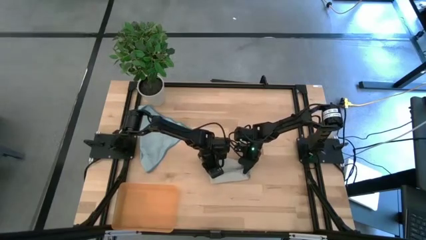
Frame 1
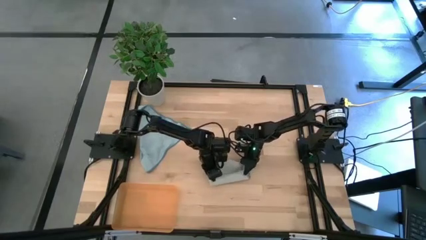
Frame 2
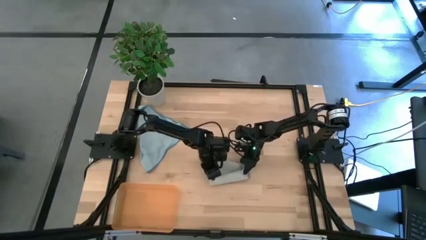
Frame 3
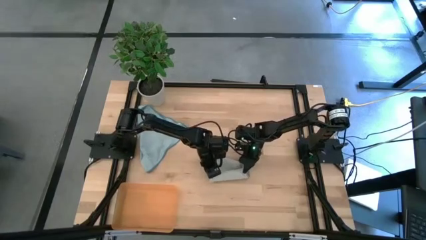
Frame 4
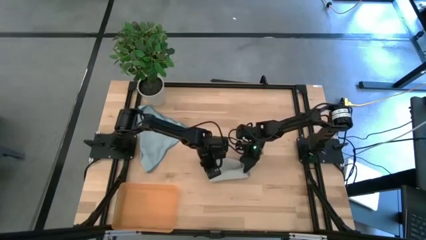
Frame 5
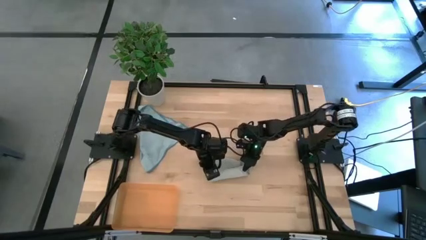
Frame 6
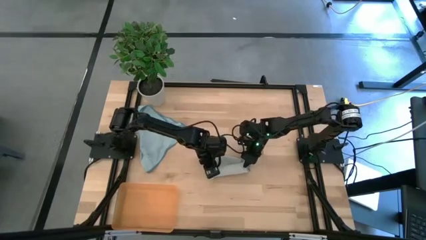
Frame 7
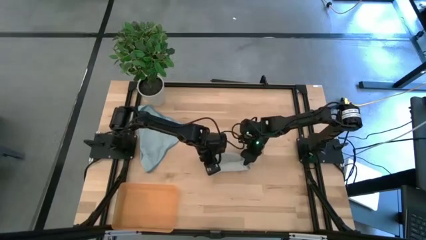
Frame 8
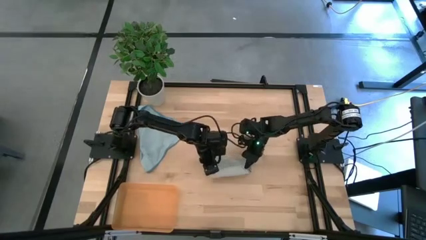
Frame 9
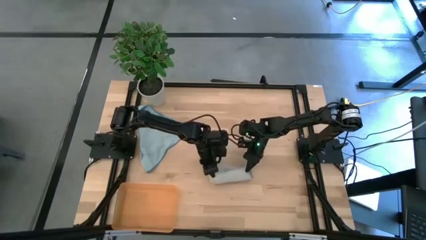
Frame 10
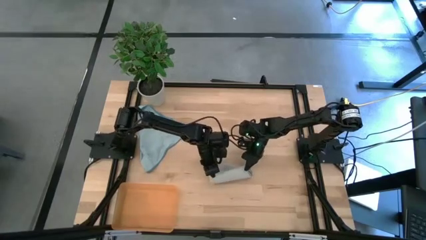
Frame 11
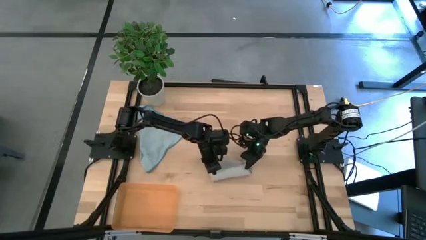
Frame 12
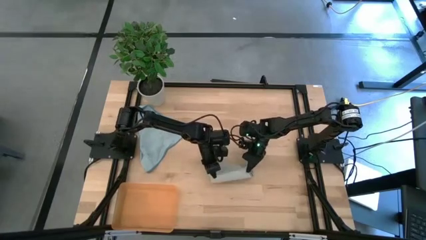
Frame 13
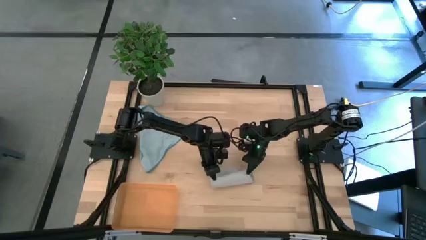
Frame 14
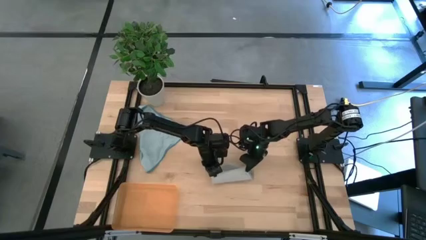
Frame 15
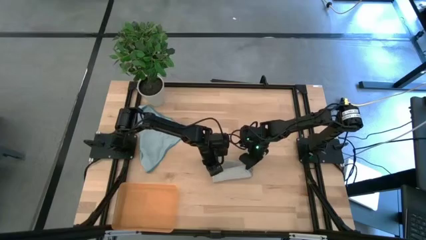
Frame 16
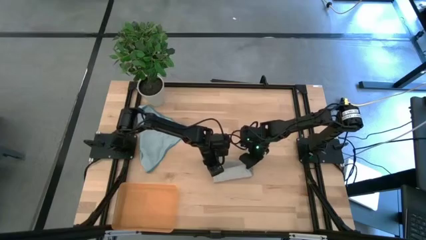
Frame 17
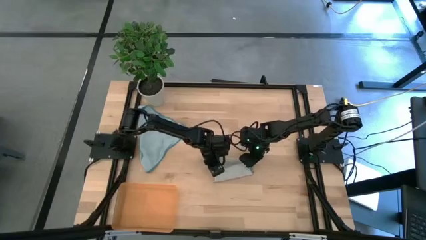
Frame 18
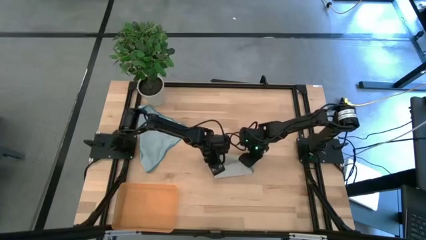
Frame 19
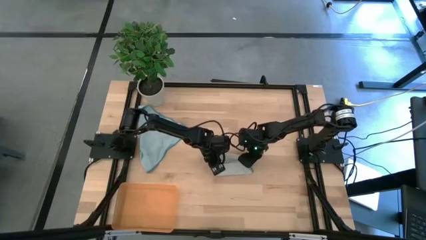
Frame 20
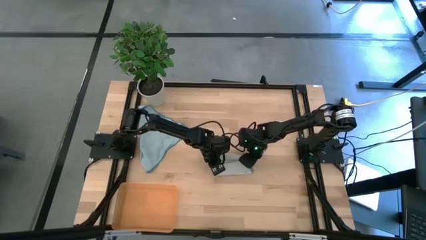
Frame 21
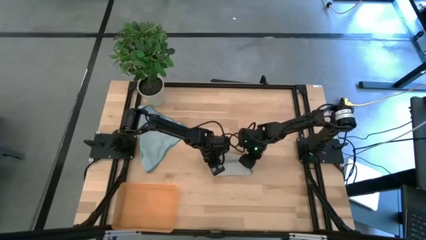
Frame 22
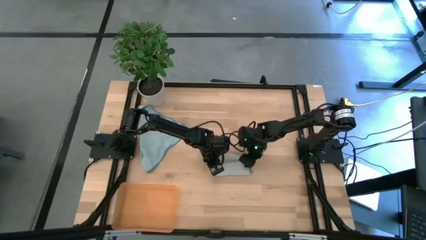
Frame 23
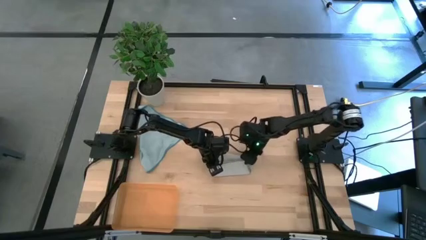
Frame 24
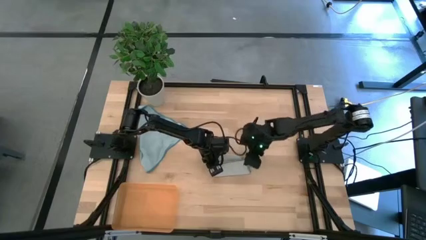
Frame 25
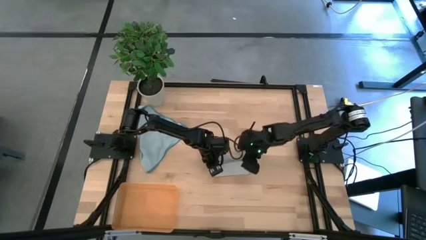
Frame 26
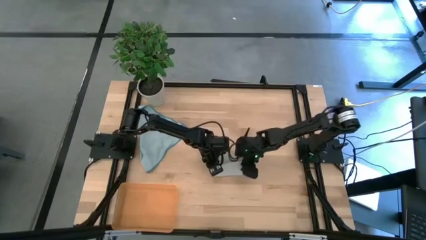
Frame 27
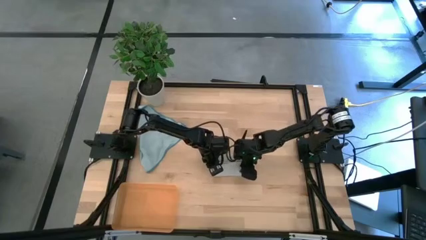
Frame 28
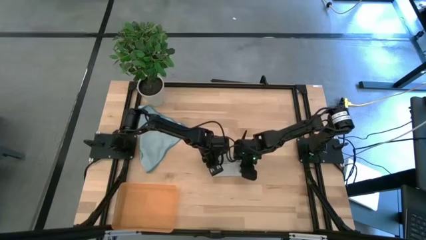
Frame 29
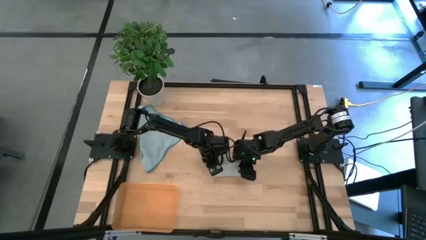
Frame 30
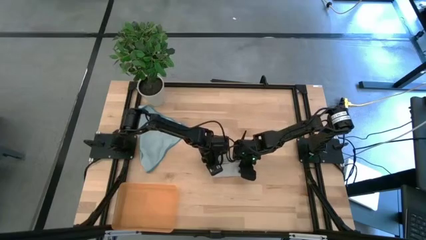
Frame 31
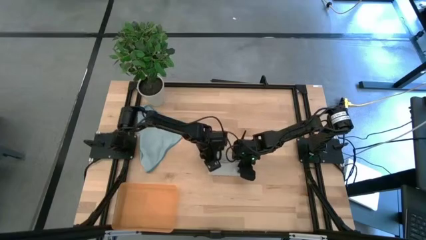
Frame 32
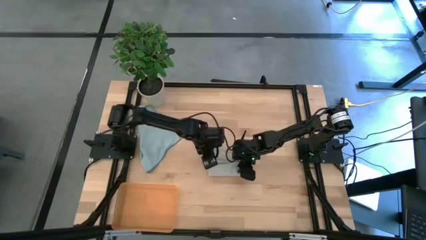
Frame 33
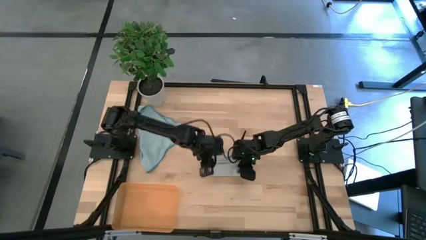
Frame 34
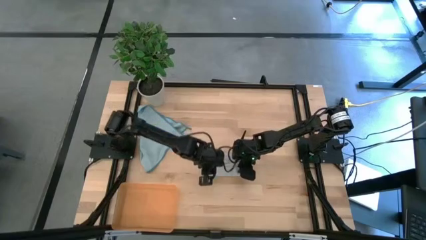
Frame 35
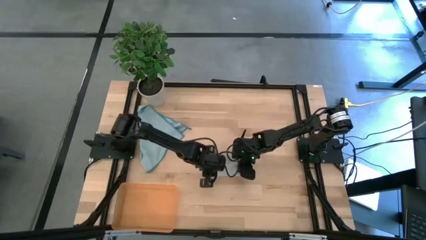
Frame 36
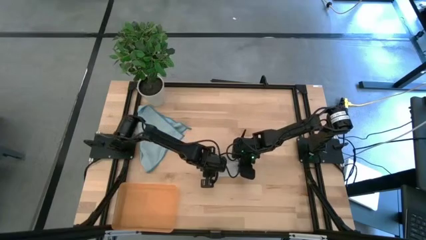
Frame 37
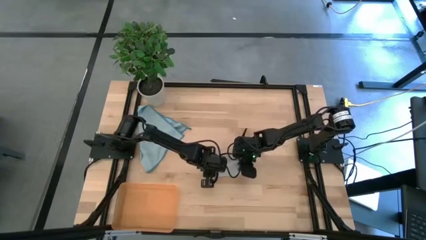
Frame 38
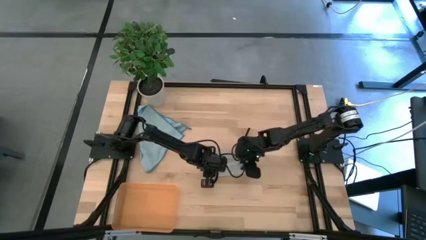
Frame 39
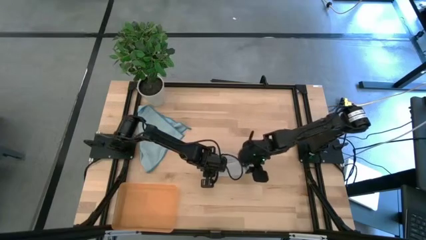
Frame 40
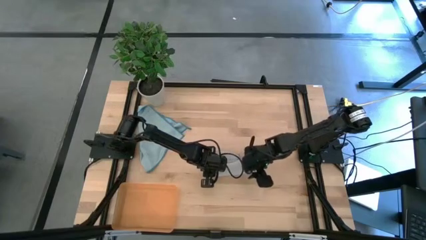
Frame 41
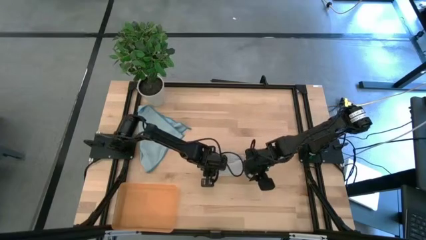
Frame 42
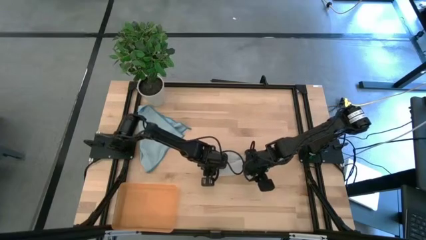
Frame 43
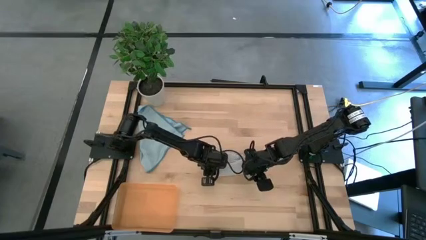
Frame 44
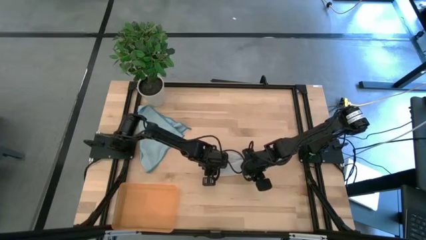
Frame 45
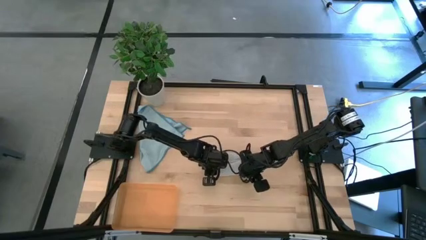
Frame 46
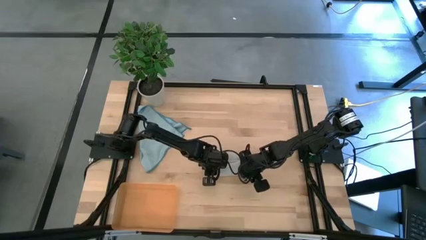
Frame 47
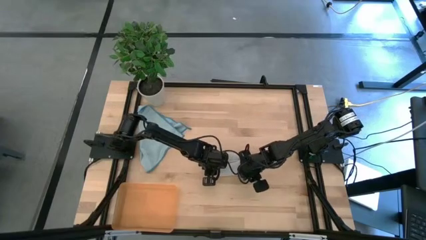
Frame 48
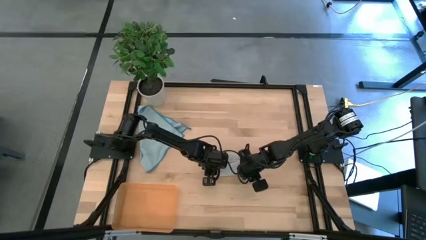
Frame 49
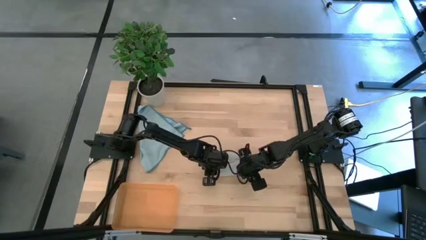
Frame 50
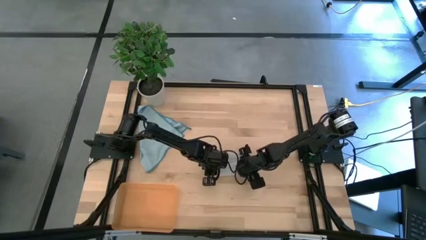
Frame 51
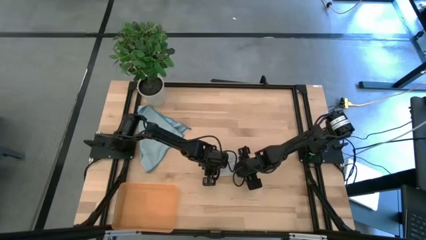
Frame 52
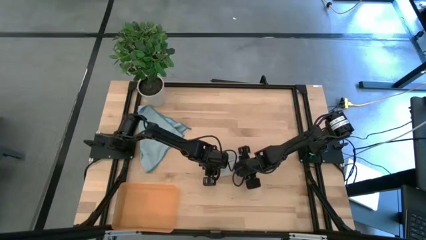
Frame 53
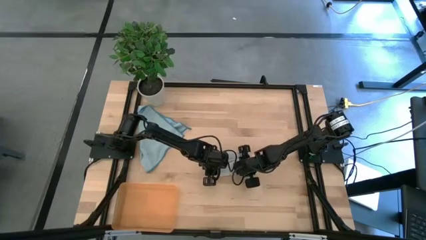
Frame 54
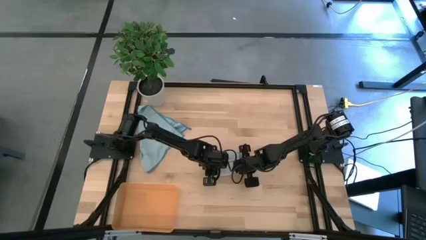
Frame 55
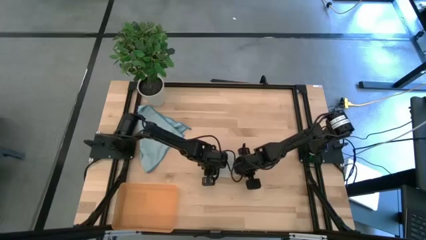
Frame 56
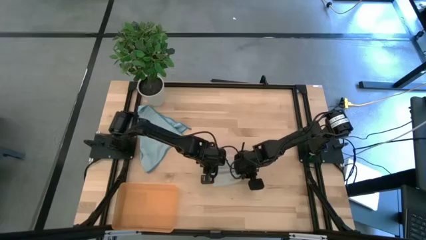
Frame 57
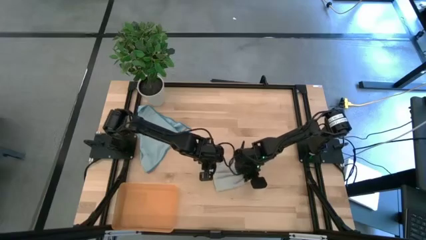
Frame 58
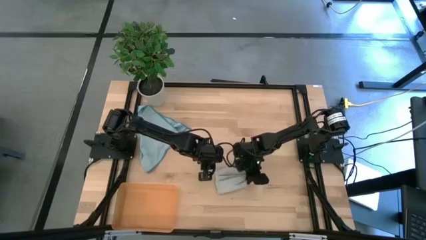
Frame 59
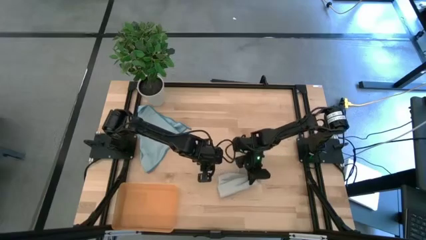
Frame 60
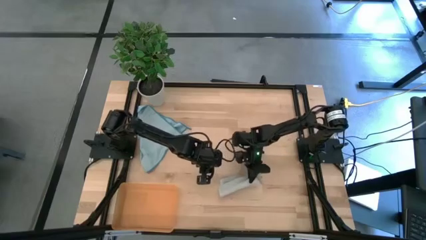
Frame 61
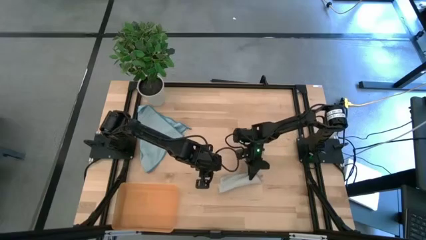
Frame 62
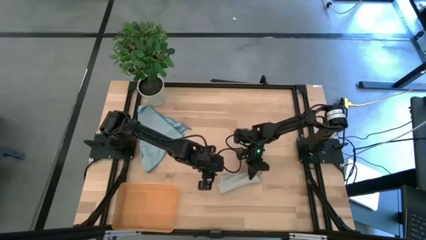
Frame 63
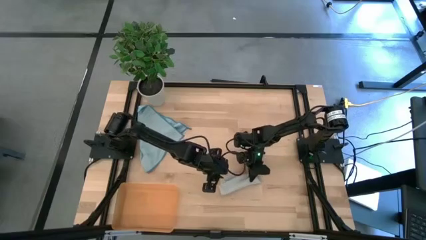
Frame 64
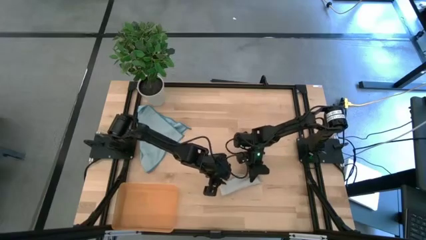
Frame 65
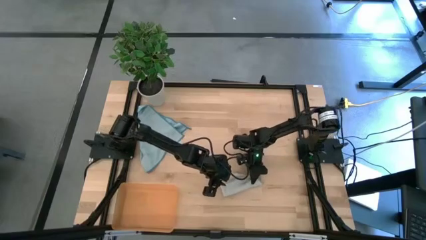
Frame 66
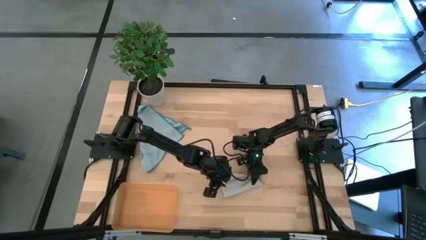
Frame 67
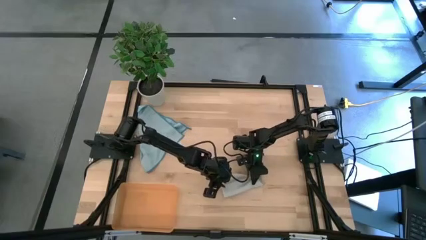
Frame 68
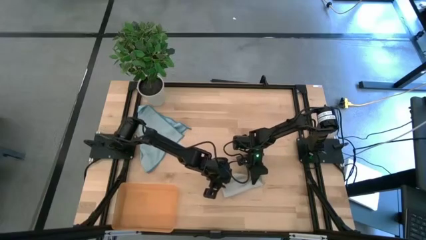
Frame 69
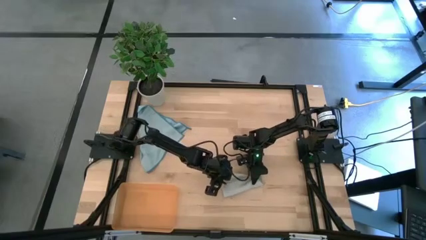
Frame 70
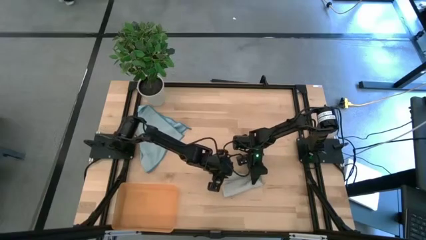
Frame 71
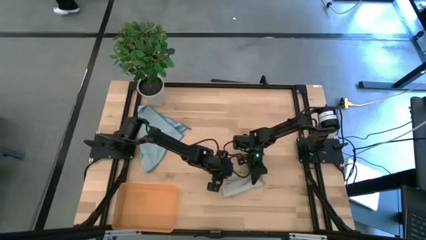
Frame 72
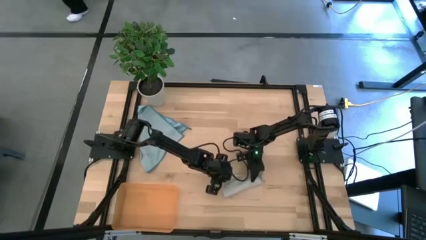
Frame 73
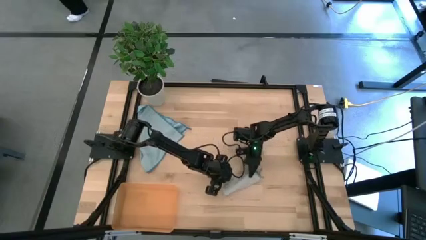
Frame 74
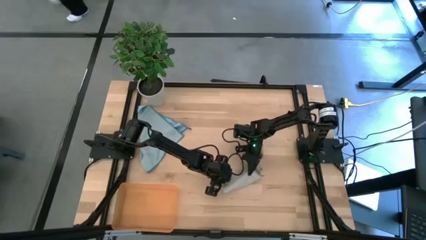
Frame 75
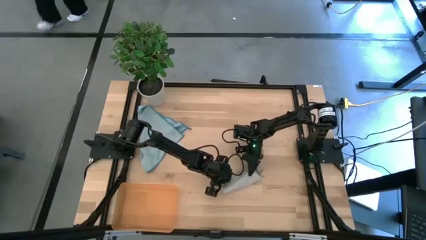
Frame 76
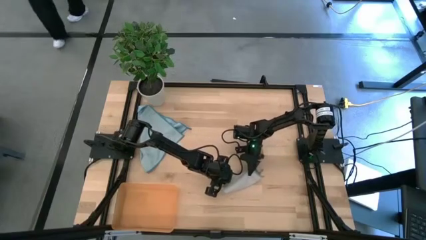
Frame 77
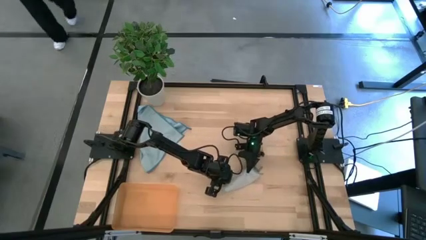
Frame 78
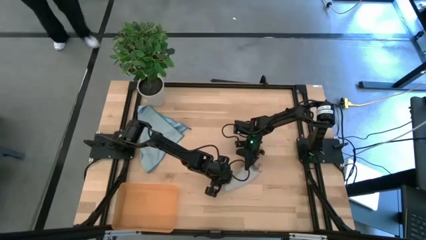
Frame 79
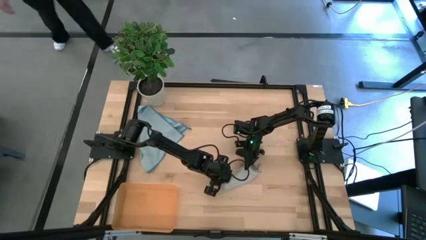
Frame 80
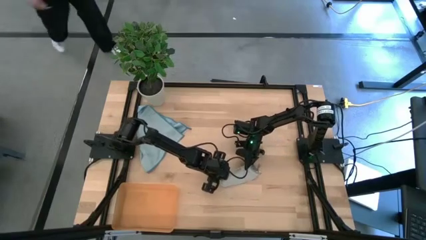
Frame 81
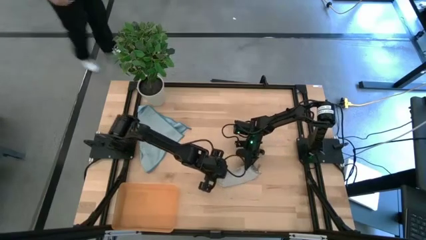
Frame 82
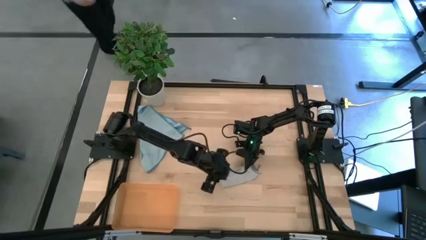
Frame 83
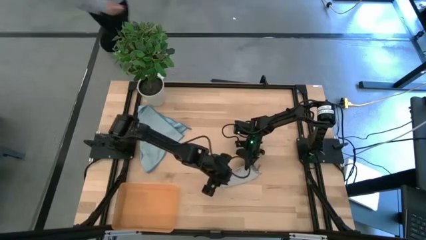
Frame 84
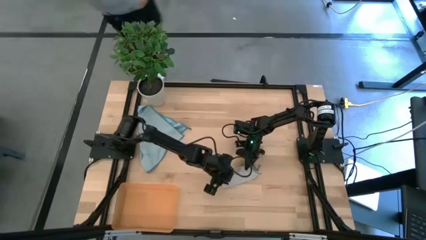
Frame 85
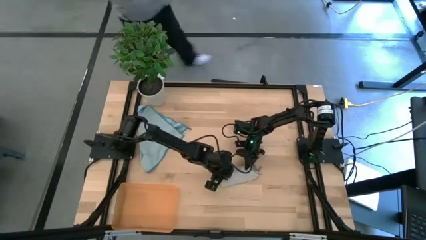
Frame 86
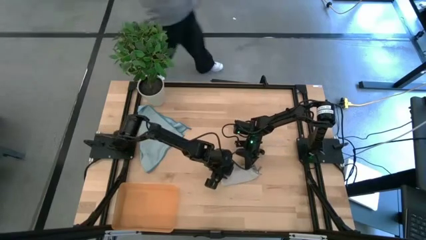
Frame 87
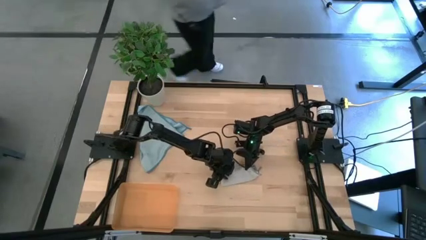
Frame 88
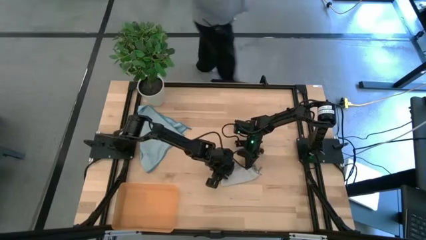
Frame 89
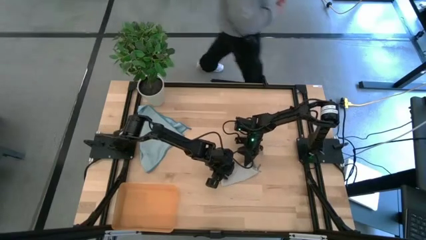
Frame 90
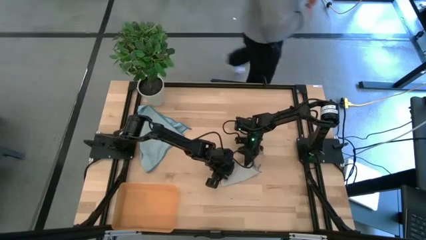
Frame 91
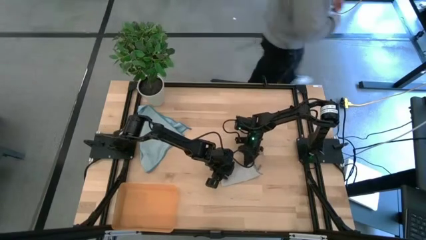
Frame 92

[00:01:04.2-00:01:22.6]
Task: Roll microfiber towels into tight, uniform cylinder then place into a basket
Roll the gray microfiber towel
